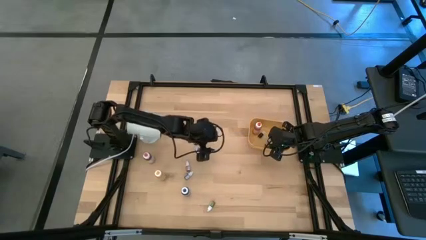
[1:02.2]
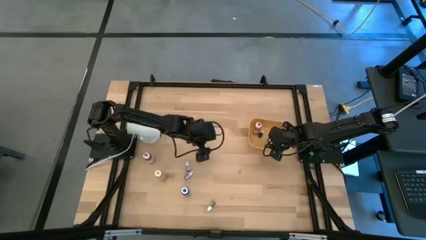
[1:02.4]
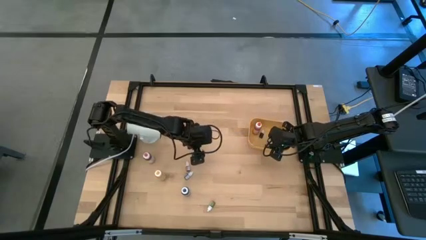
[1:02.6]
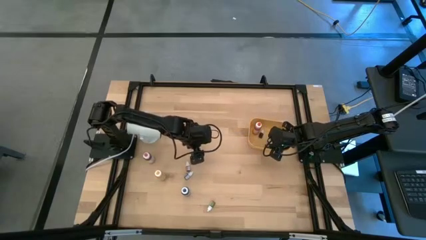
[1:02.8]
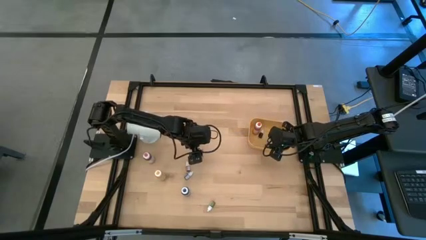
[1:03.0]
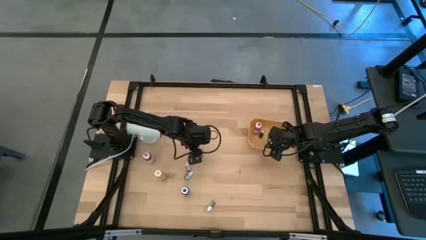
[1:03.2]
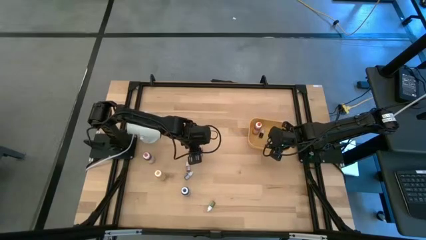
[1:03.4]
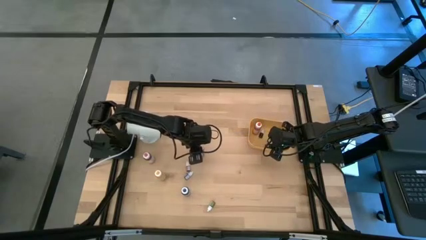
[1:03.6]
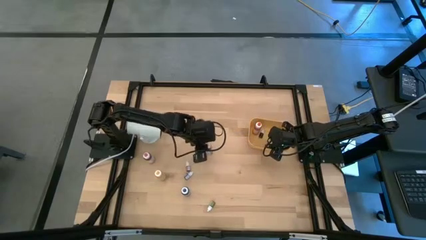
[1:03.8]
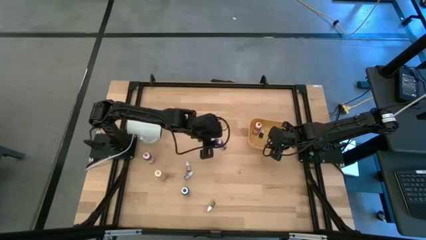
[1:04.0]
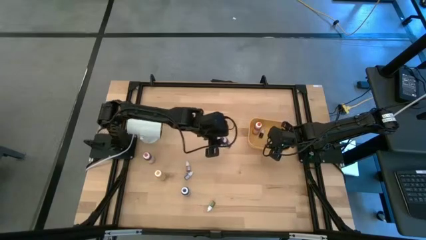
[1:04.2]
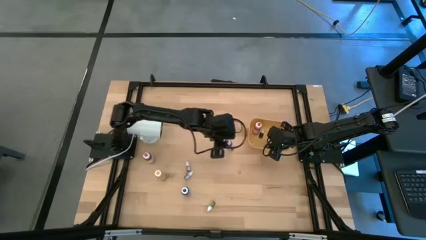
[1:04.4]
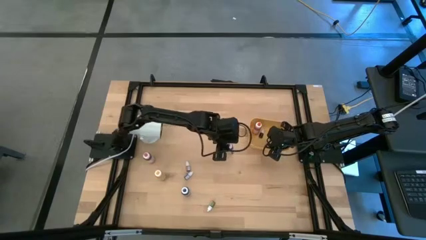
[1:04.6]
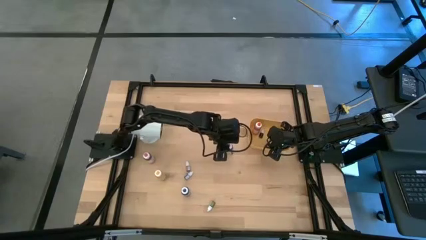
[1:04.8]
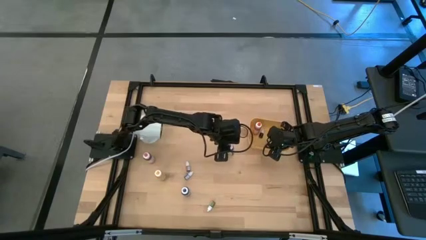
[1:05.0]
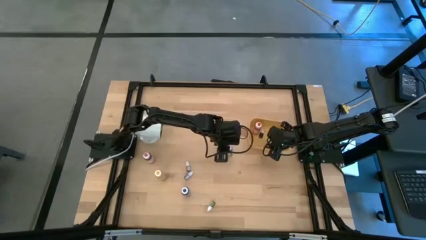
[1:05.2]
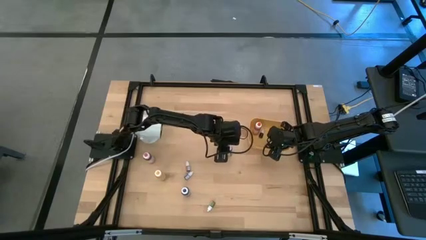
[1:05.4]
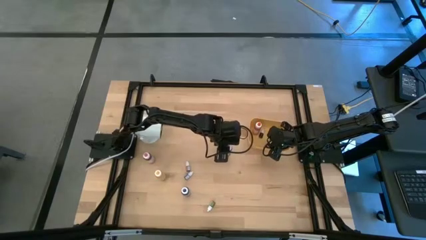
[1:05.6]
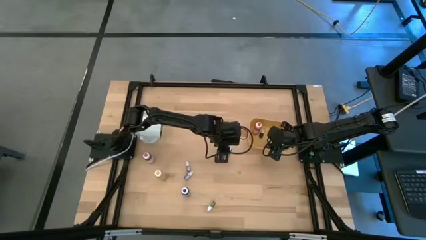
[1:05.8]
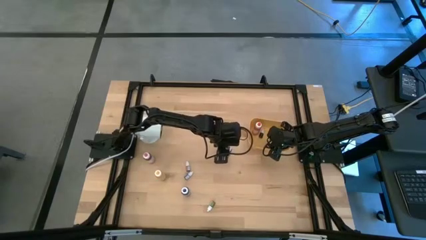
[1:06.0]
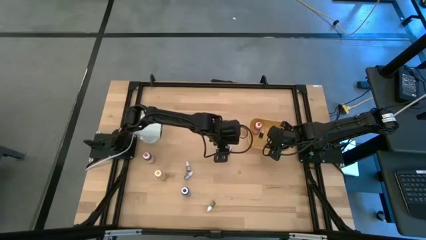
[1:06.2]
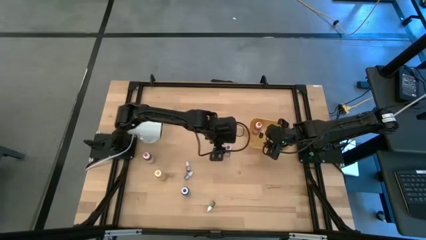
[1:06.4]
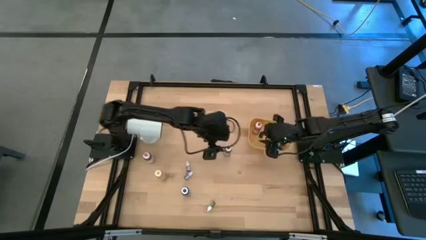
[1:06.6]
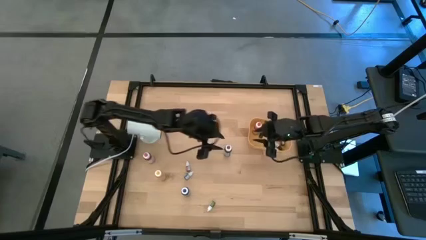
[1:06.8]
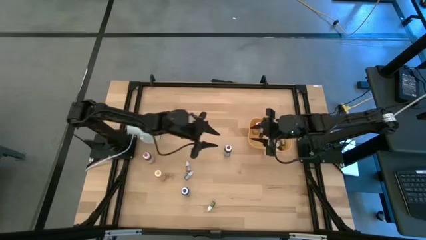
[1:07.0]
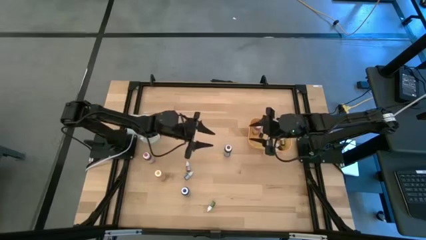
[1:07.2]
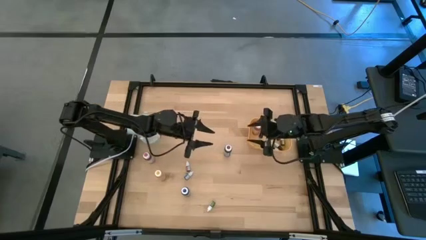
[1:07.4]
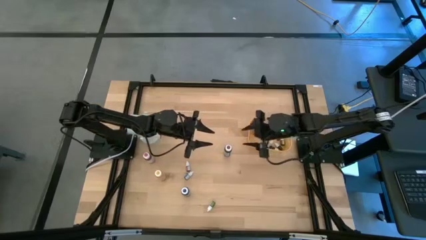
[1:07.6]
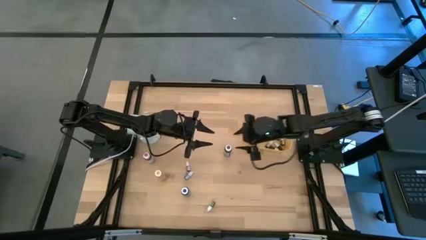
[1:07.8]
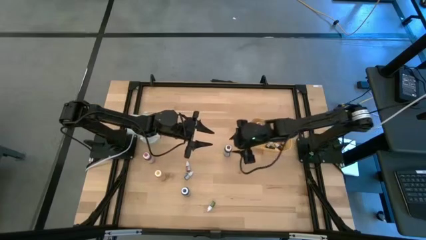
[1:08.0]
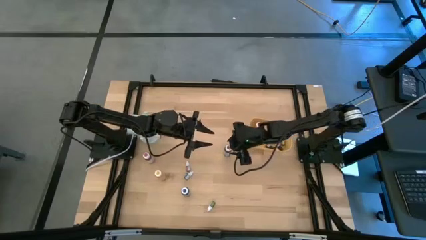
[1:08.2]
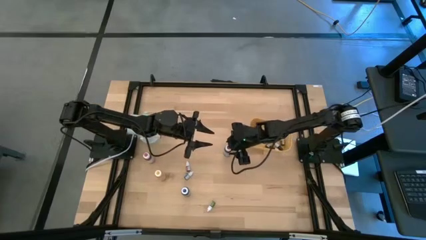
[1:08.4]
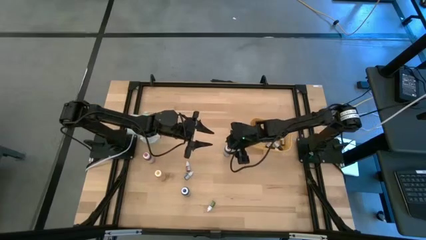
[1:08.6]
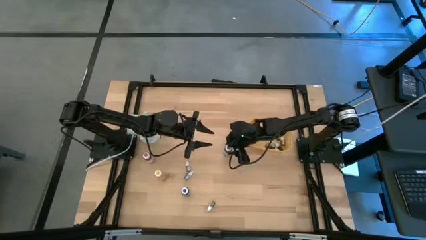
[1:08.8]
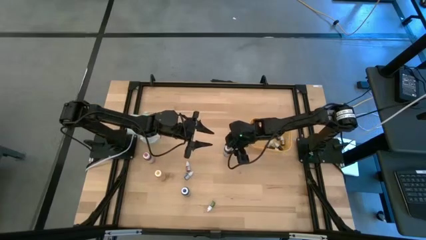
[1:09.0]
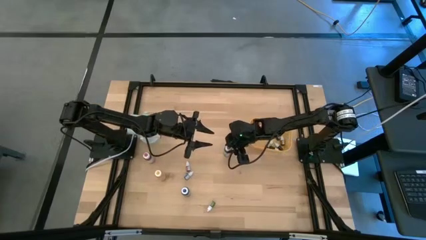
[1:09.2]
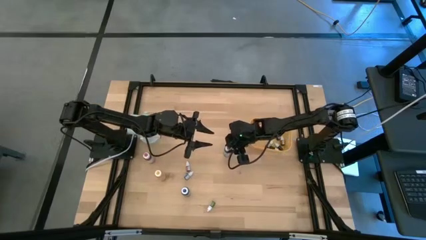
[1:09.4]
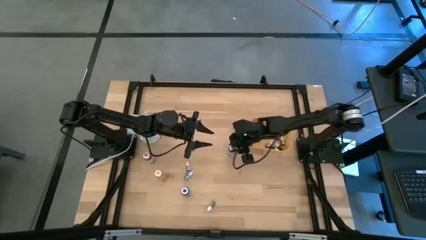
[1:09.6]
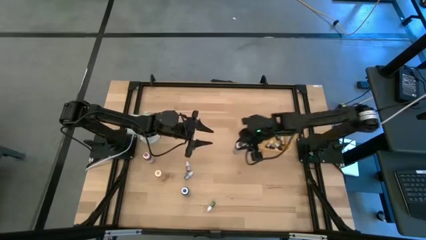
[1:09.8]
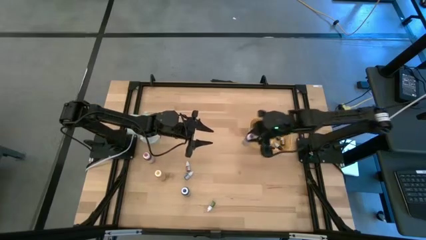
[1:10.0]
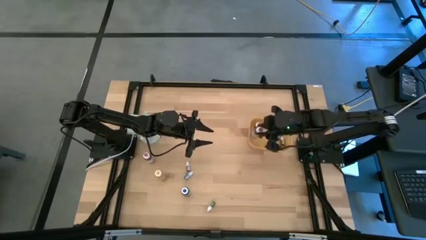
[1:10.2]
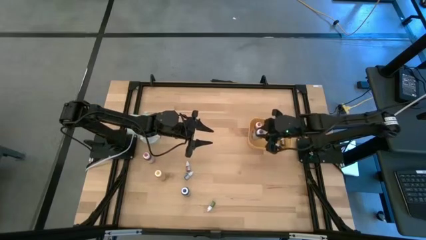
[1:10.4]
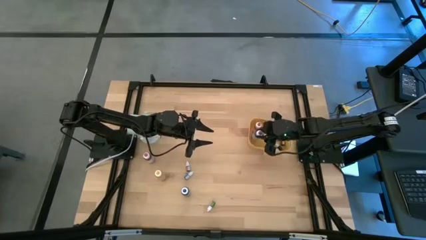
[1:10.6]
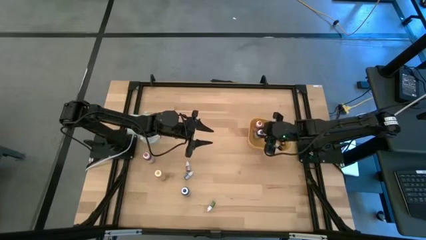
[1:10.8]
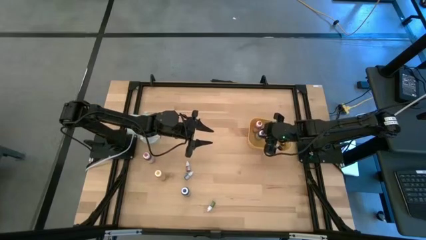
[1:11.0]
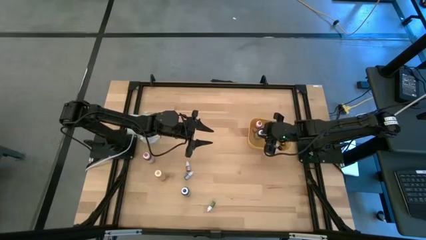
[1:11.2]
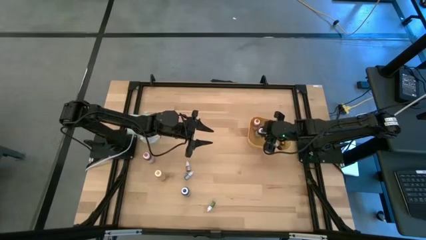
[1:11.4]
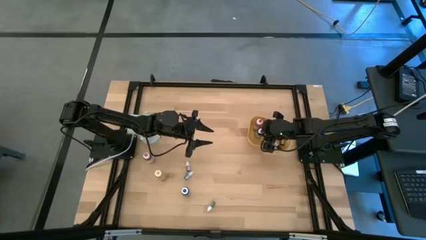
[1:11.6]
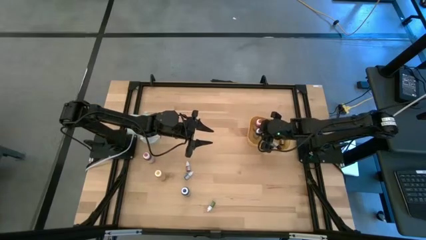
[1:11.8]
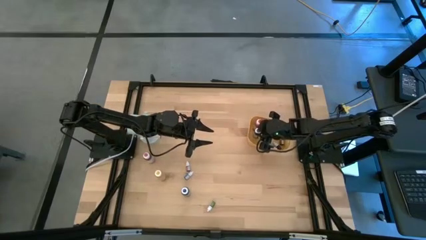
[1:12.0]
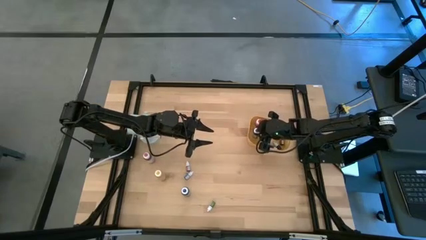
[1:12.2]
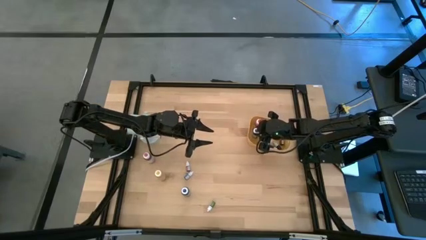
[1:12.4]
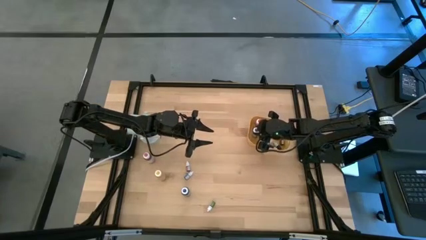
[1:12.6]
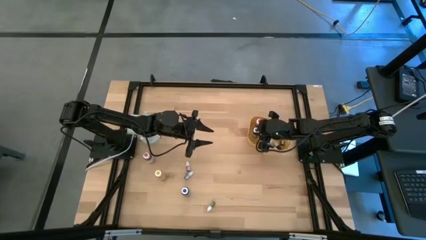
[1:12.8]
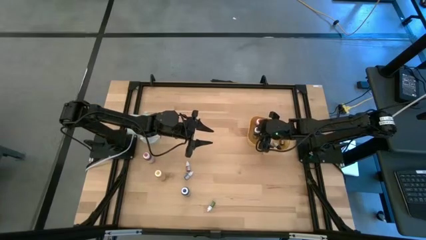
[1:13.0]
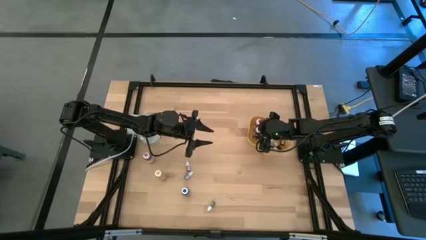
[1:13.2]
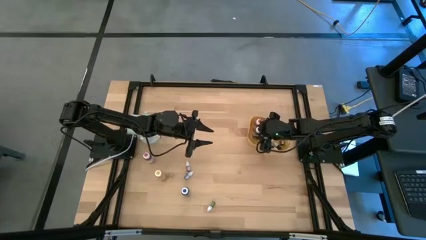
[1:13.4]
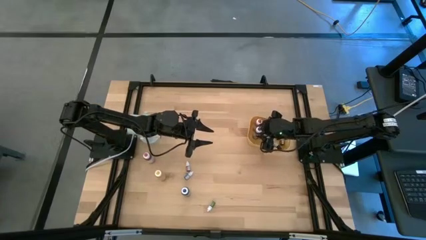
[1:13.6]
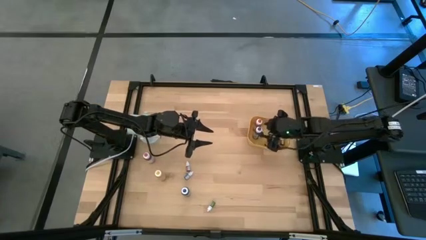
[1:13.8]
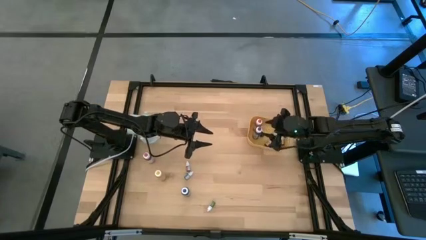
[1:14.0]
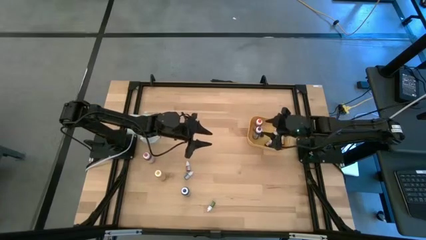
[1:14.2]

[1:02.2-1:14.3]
Task: Pick & Place food coloring
Put the violet food coloring into the yellow bin

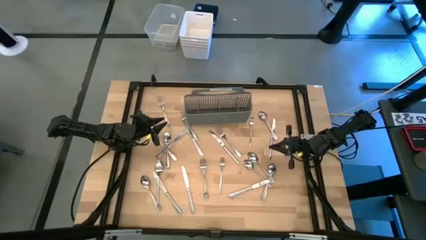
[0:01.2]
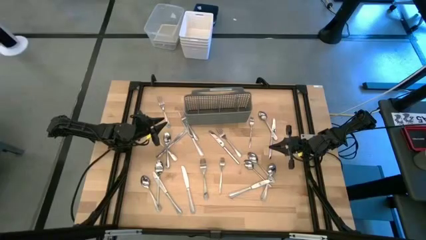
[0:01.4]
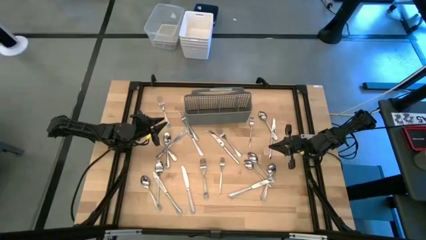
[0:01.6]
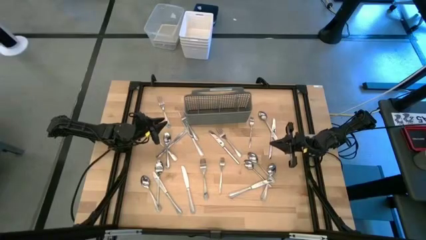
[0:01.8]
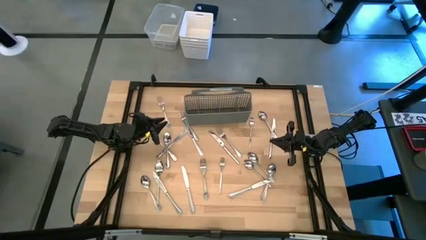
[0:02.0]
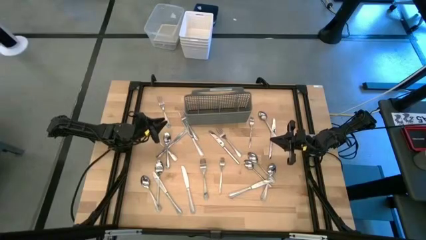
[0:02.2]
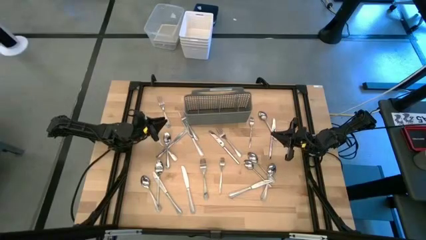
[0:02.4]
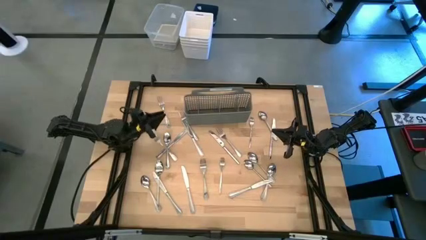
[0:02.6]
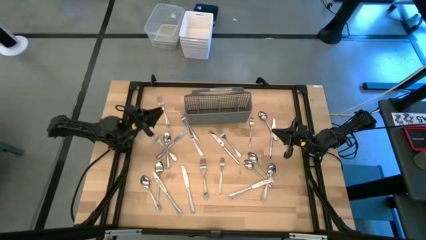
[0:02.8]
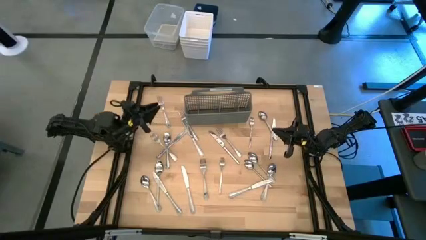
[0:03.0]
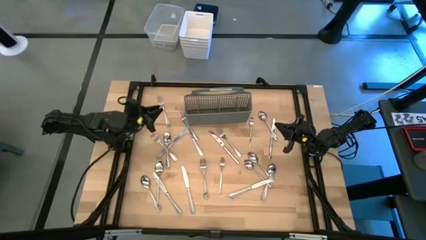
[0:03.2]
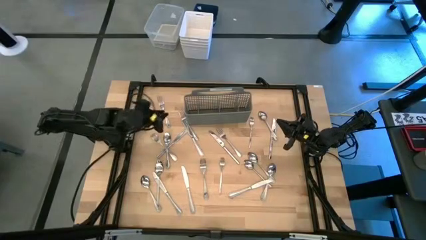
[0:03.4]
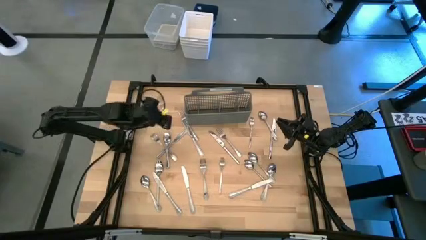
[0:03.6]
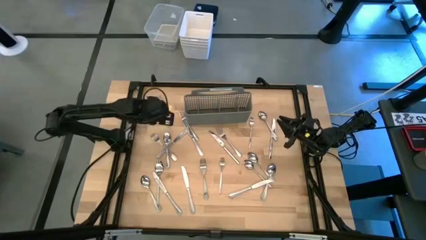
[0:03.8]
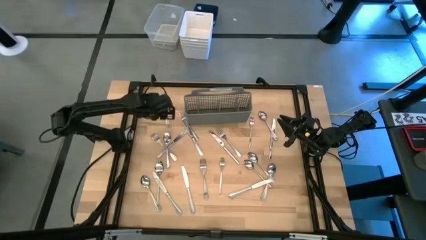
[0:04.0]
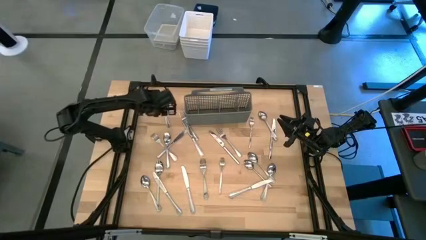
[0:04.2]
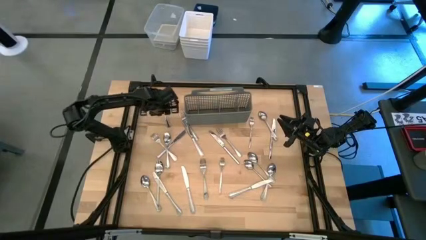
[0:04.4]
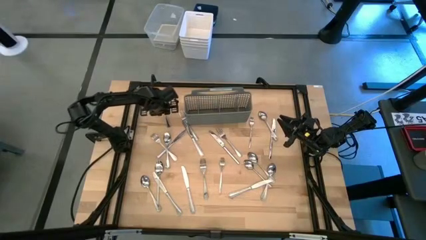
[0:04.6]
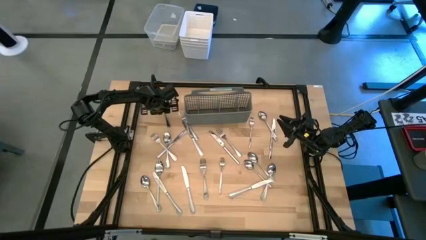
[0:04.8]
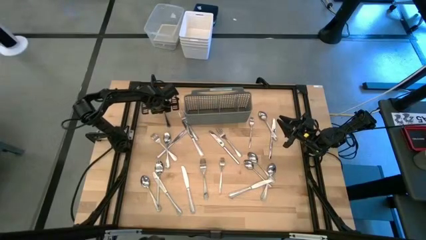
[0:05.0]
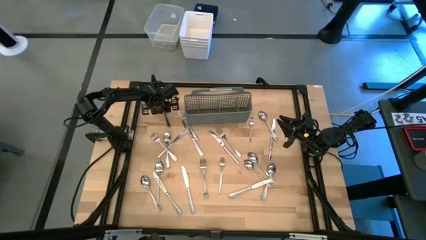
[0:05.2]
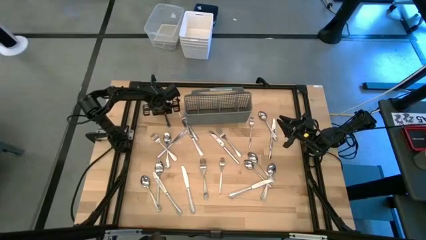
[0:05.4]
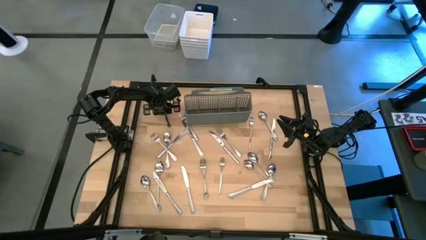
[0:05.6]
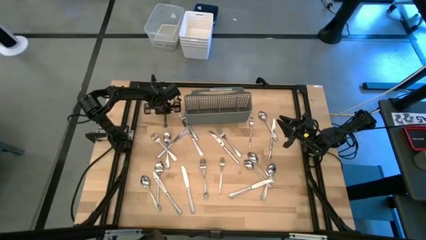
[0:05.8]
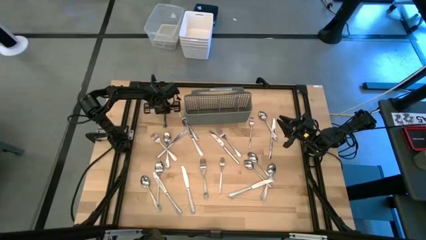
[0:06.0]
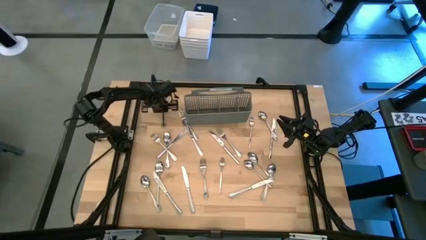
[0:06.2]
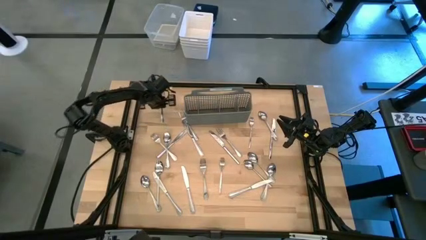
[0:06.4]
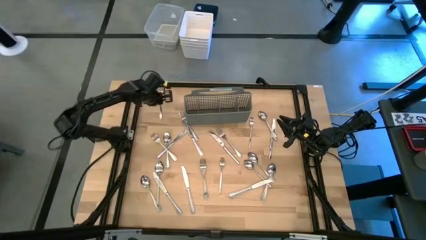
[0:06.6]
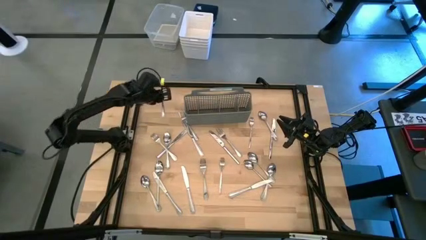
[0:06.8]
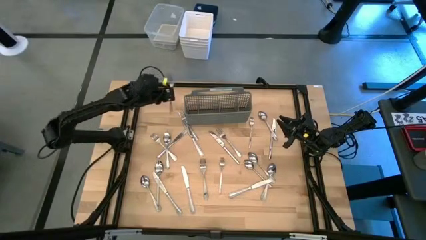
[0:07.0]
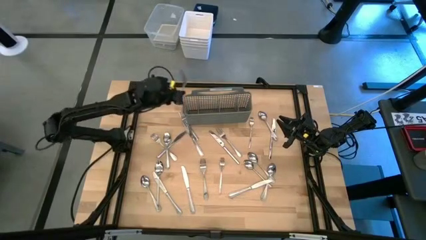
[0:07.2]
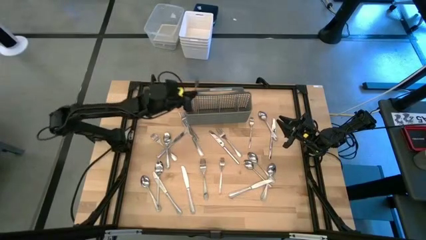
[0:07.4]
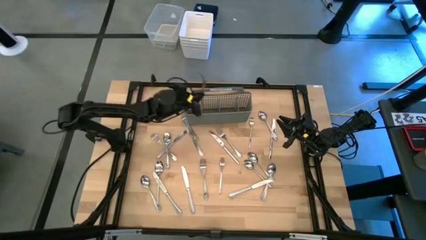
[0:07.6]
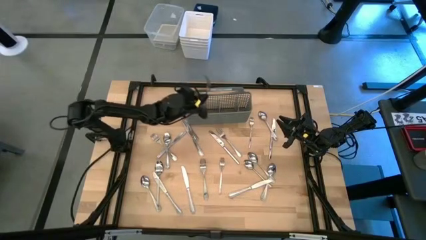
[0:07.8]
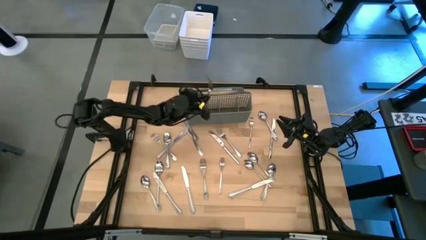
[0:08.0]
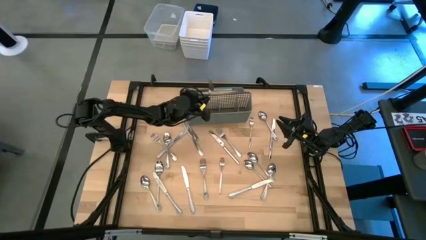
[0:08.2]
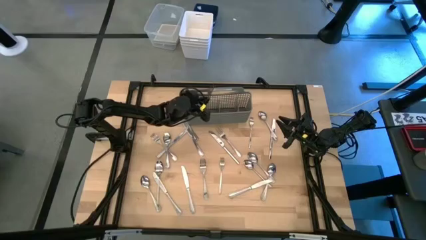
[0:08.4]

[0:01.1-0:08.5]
Task: Sort silverware
Put the silver fork into the gray silverware organizer
